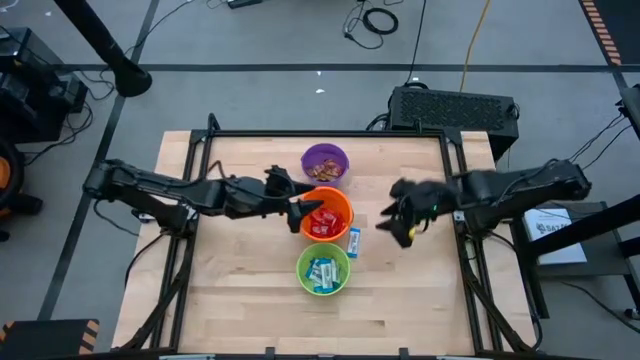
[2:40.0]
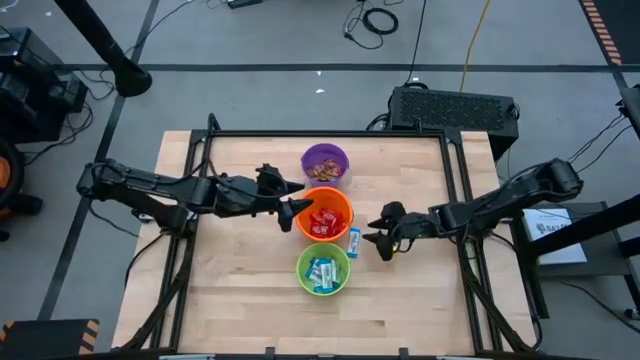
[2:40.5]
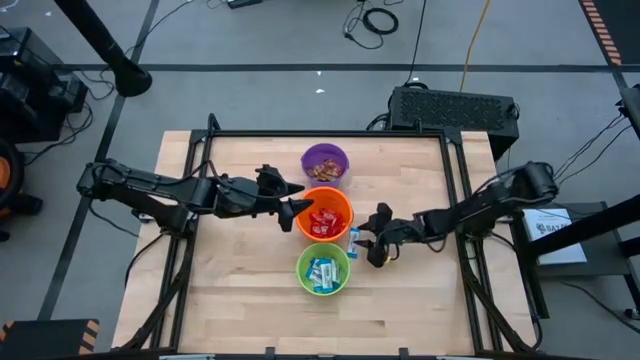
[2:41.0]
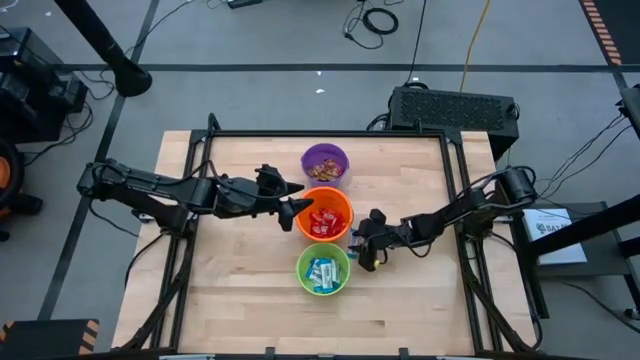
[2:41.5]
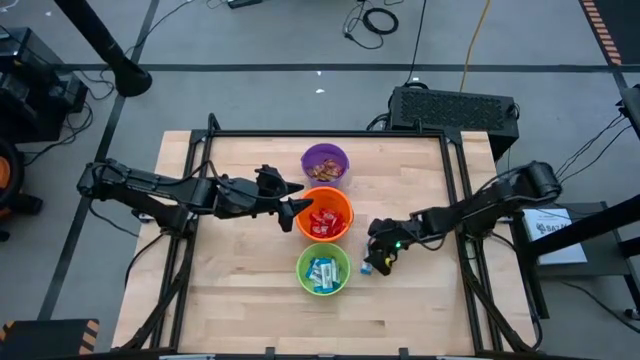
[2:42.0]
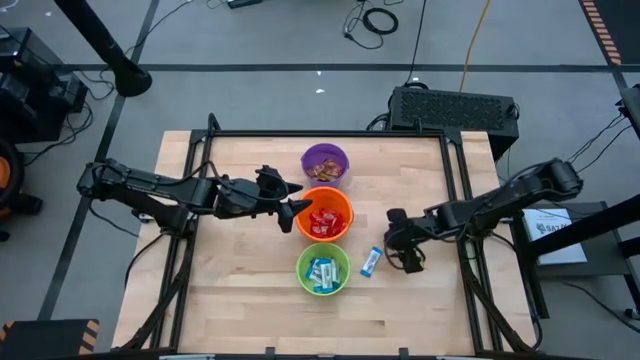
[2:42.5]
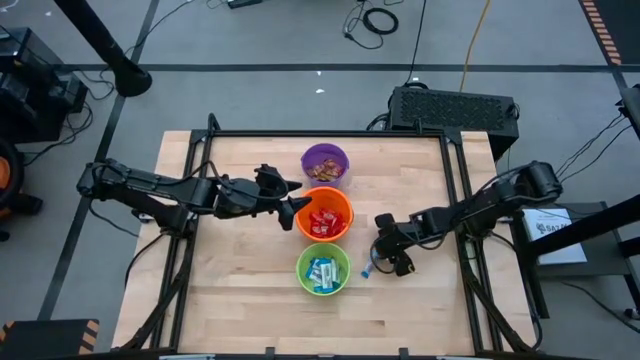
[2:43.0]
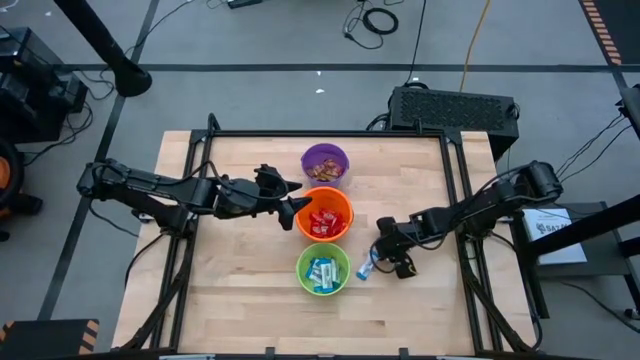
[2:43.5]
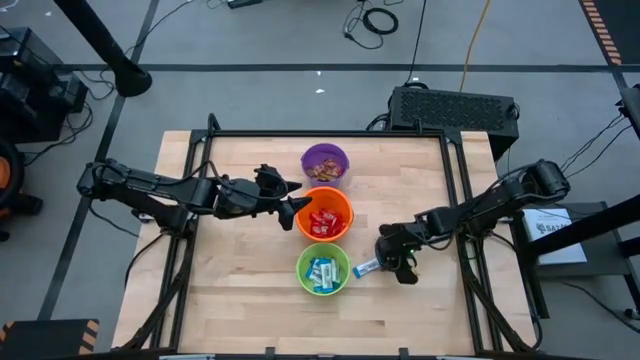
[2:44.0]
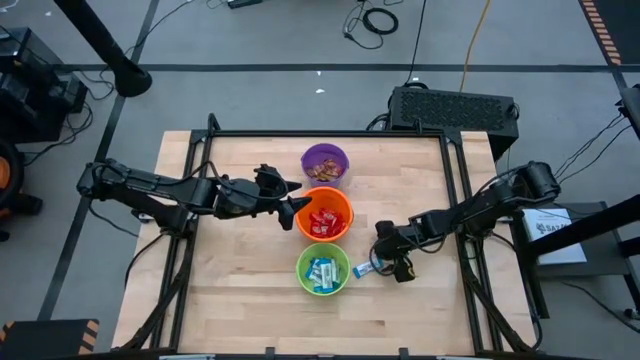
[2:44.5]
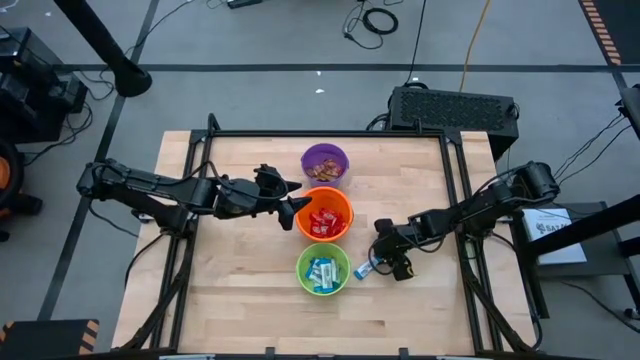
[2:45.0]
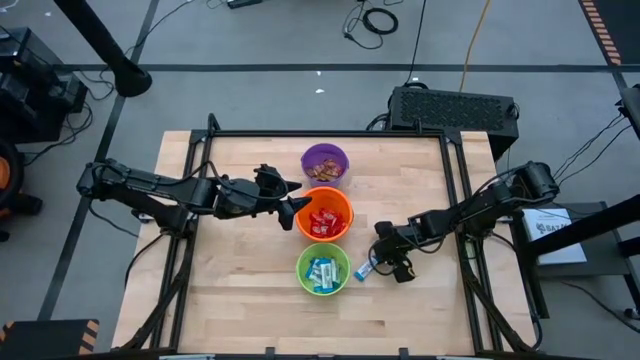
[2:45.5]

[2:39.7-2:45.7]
Task: Sort candy by brand, put in halloween buckets
Put blue chocolate bar into the green bucket

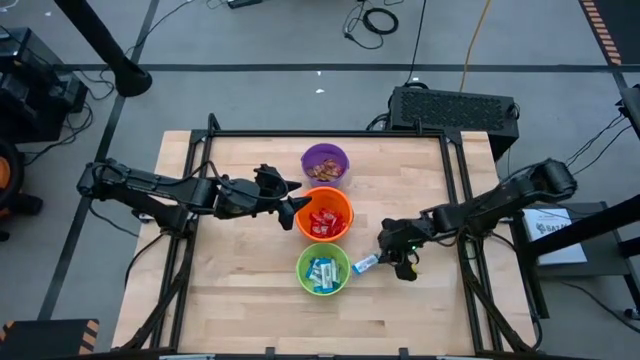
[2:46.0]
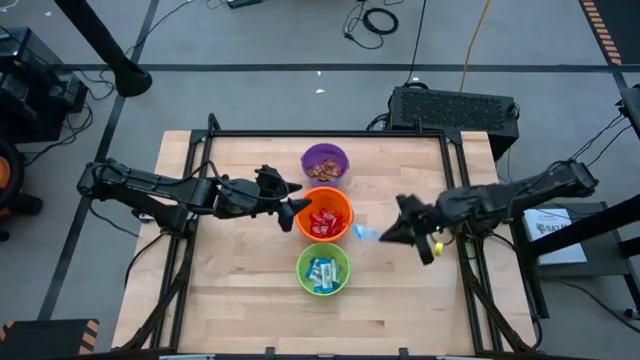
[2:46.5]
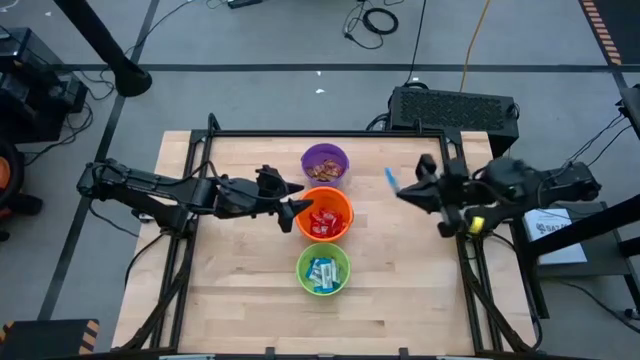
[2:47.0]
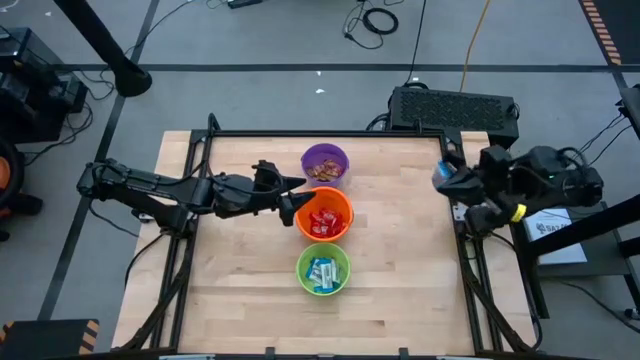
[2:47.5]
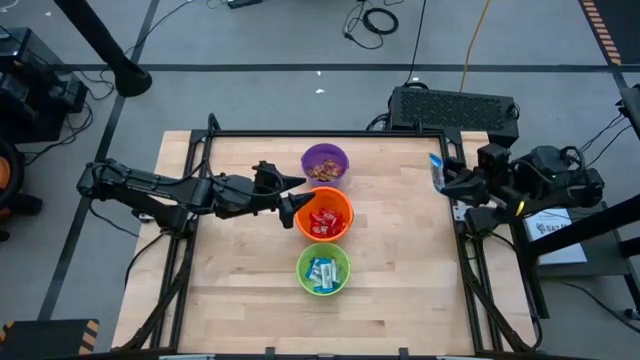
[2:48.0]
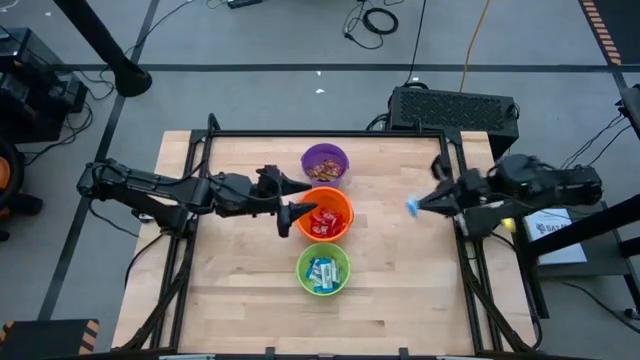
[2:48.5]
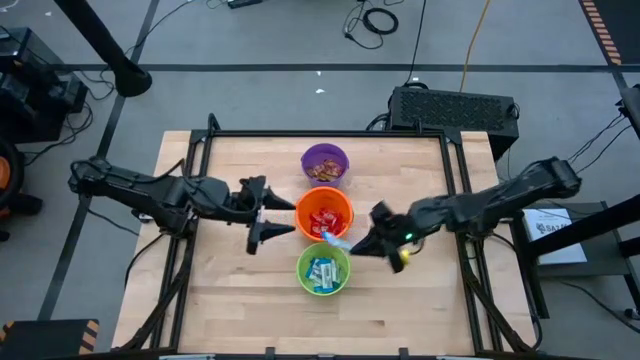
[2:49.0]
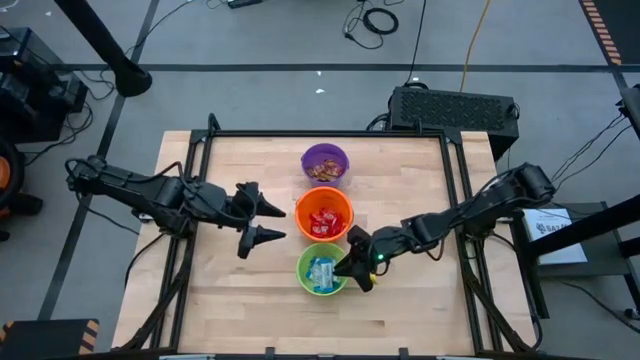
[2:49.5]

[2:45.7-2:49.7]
Put blue chocolate bar into the green bucket

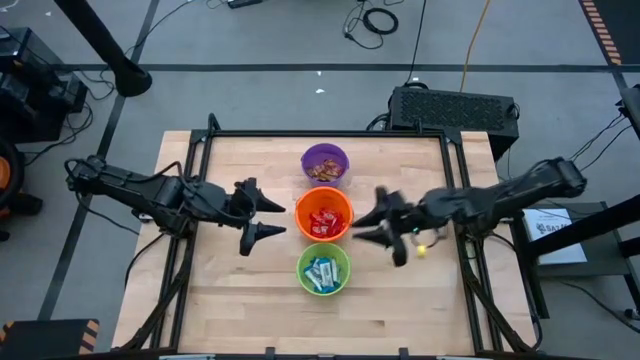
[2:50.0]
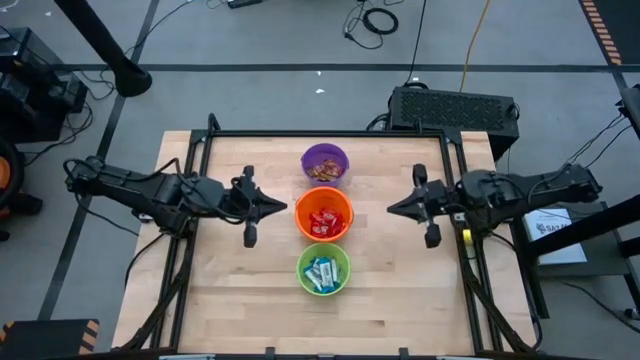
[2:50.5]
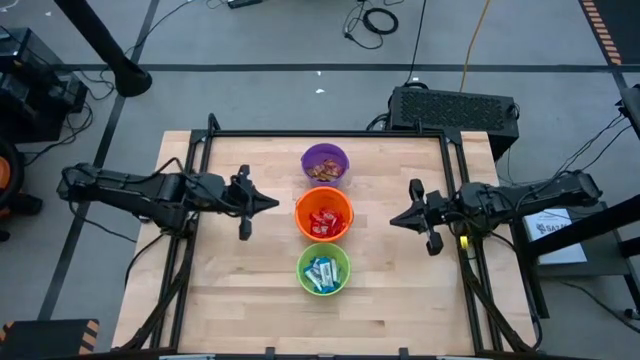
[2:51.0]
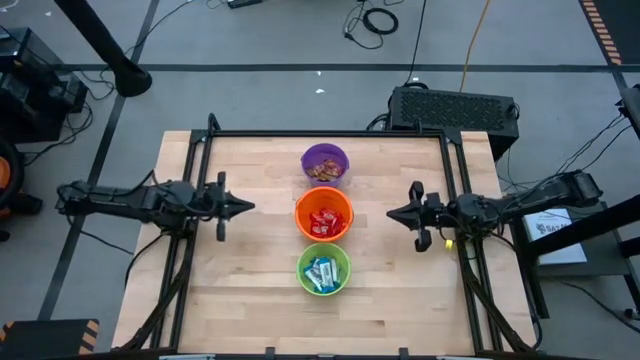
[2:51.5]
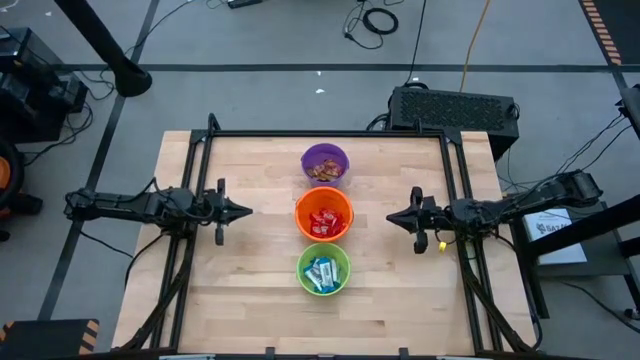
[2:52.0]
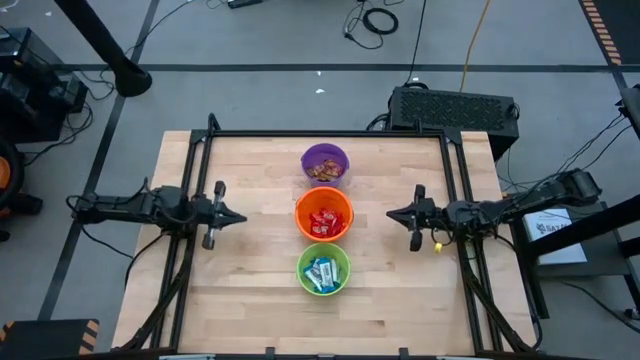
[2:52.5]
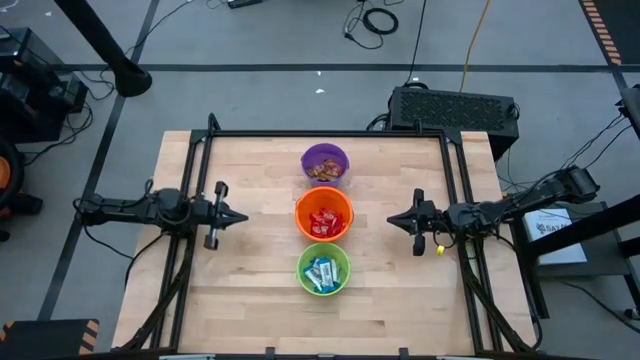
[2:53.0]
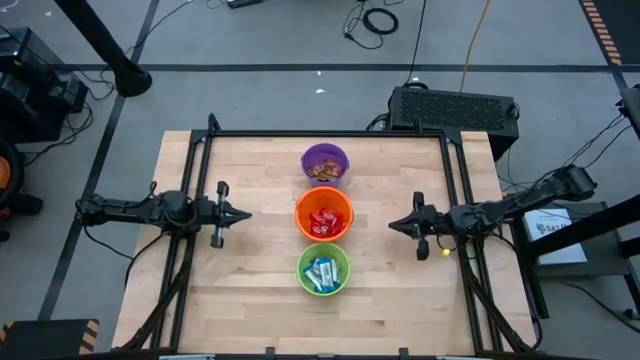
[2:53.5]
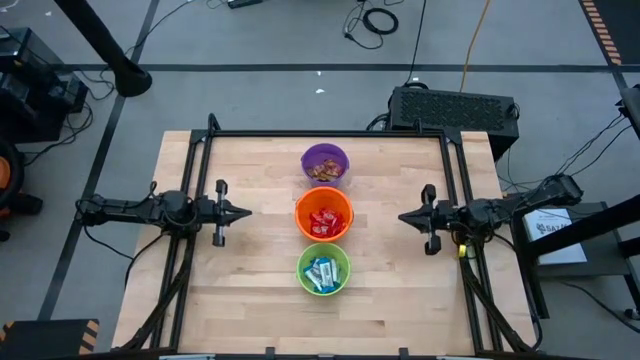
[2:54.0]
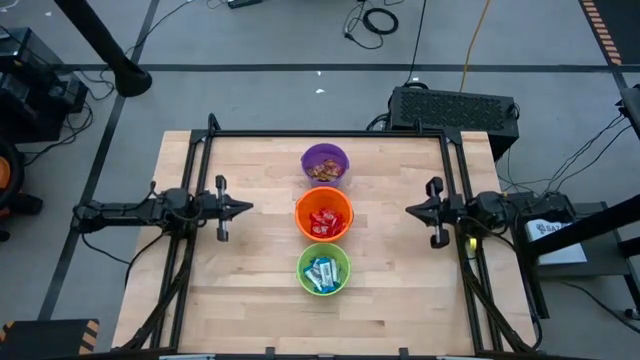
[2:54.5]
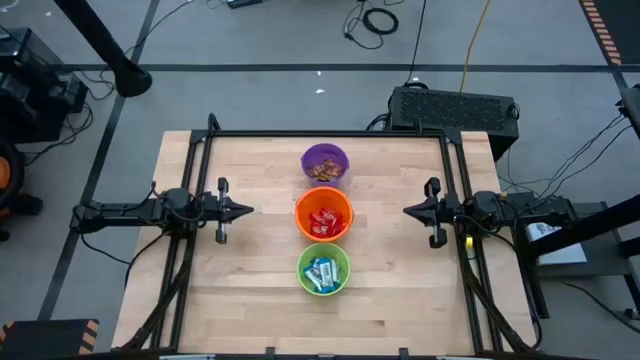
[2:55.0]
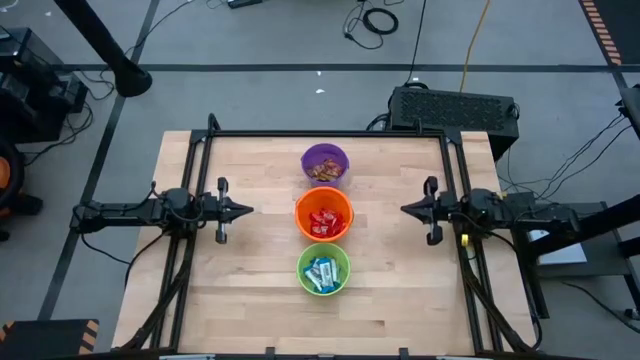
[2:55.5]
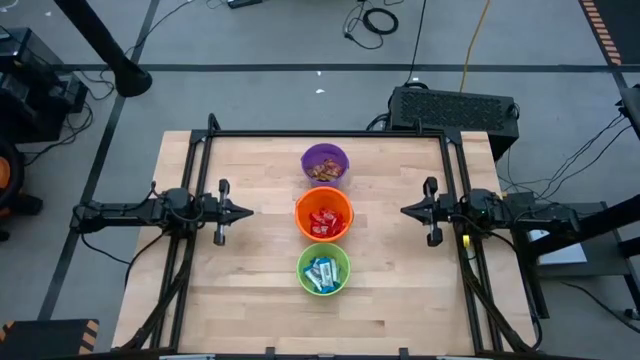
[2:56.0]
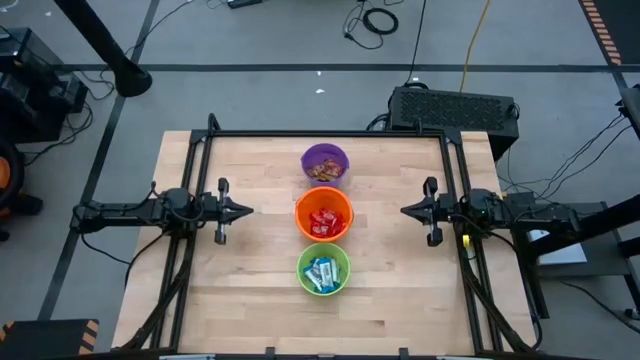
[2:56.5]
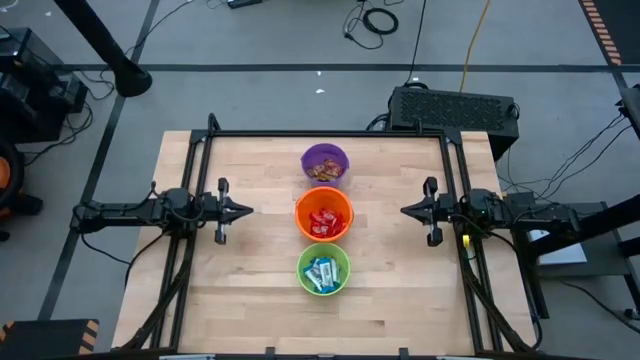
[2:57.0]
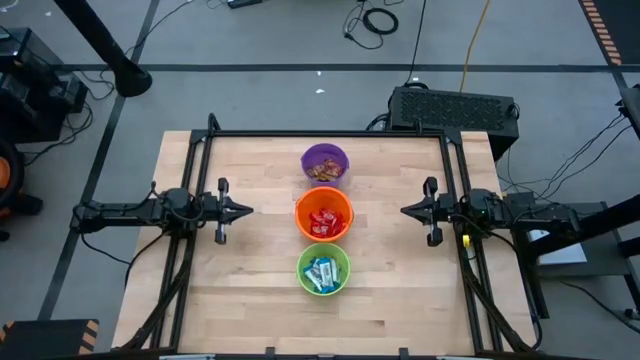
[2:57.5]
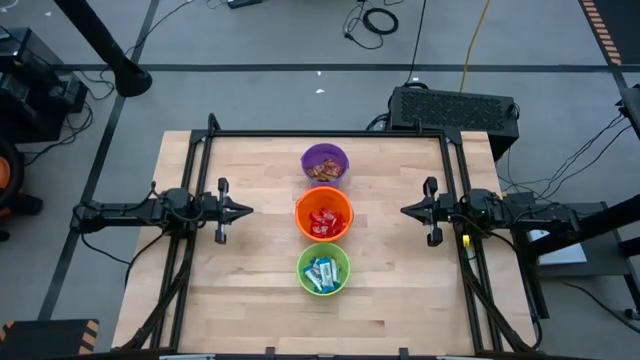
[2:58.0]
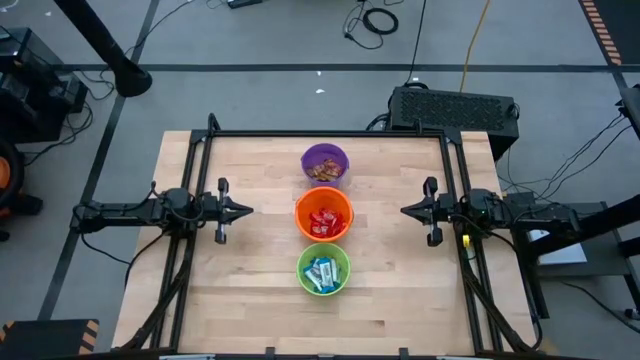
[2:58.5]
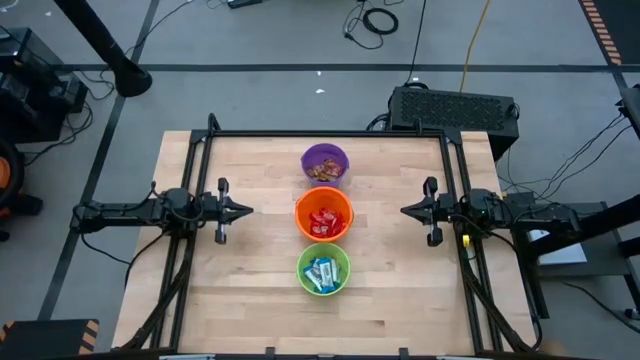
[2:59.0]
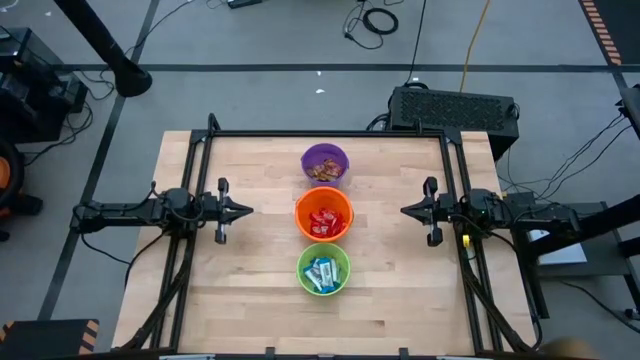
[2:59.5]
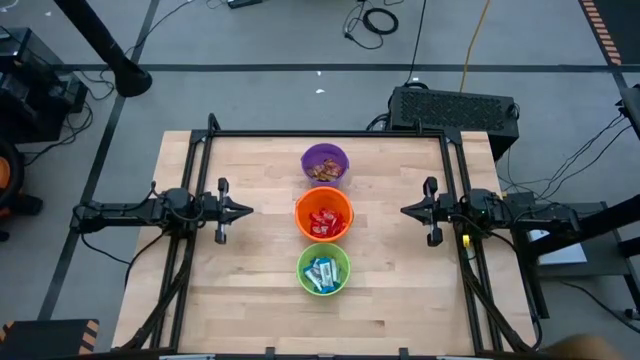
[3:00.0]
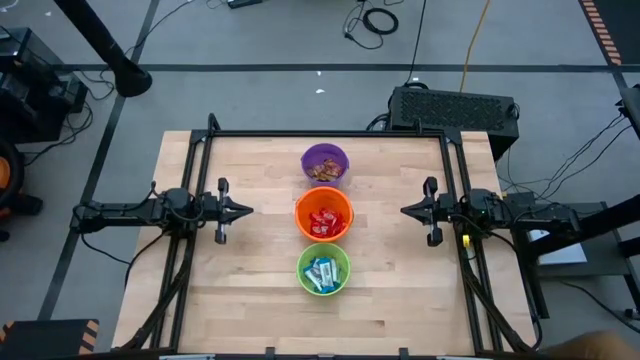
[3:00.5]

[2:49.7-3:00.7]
Return to Home Position
